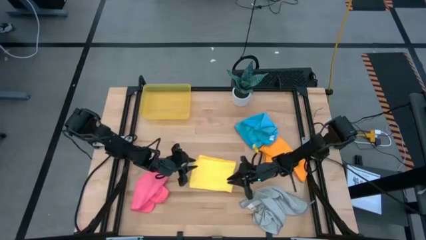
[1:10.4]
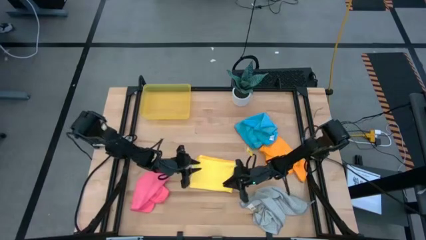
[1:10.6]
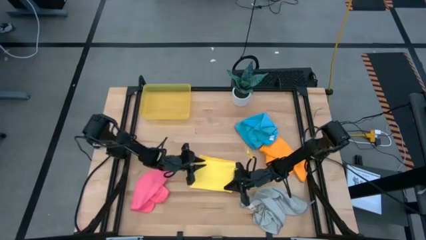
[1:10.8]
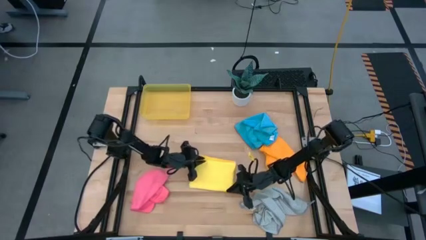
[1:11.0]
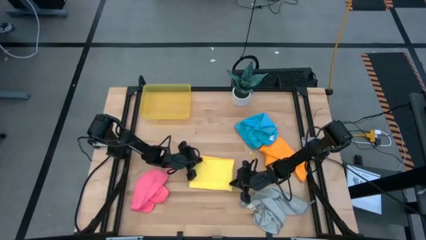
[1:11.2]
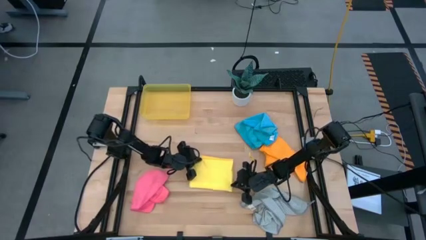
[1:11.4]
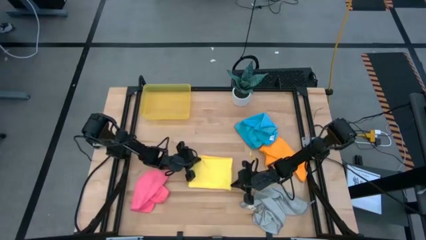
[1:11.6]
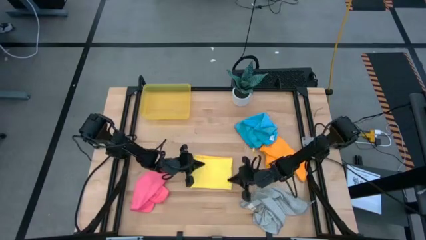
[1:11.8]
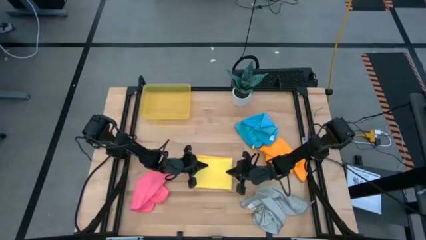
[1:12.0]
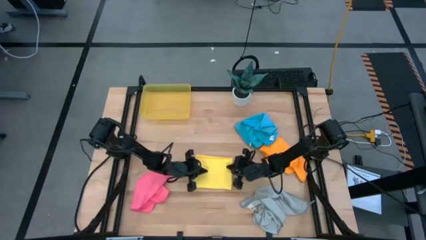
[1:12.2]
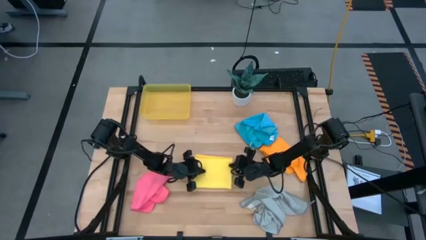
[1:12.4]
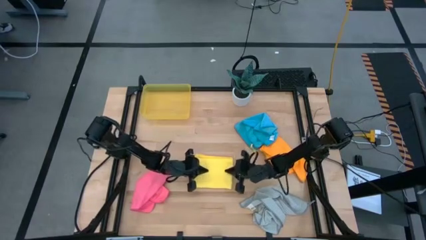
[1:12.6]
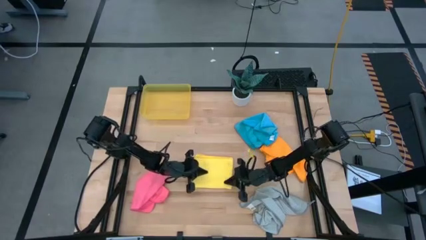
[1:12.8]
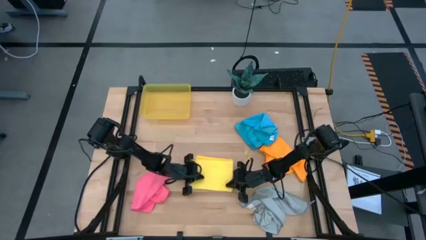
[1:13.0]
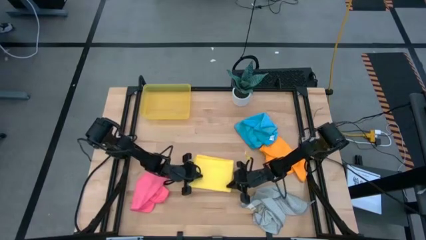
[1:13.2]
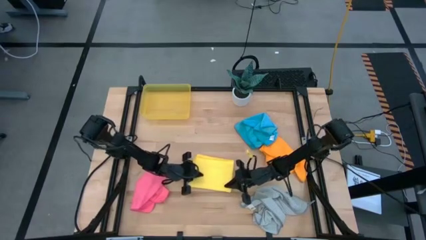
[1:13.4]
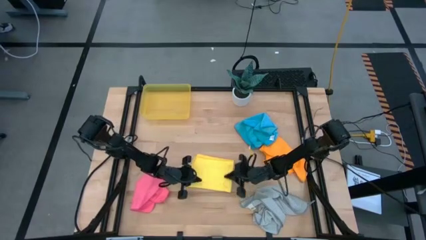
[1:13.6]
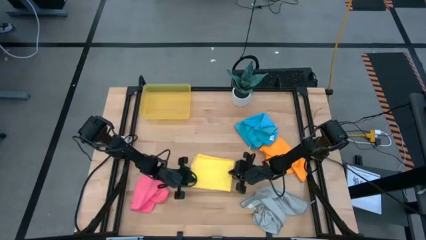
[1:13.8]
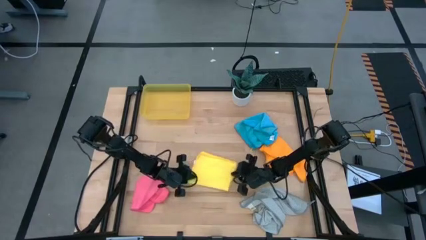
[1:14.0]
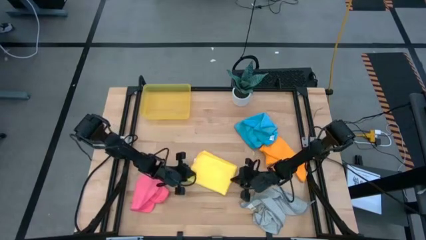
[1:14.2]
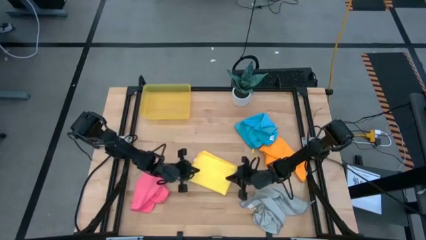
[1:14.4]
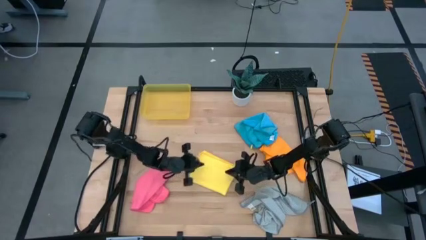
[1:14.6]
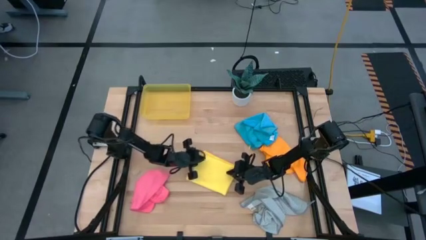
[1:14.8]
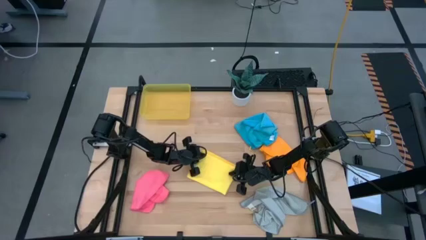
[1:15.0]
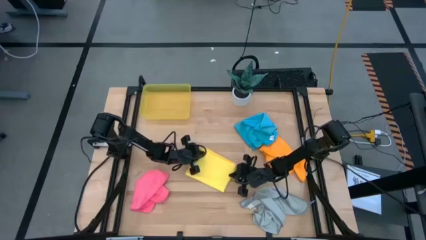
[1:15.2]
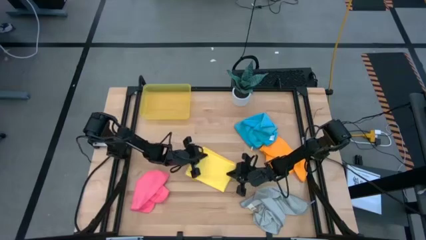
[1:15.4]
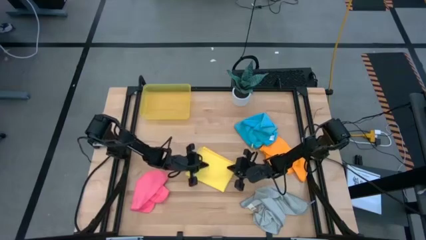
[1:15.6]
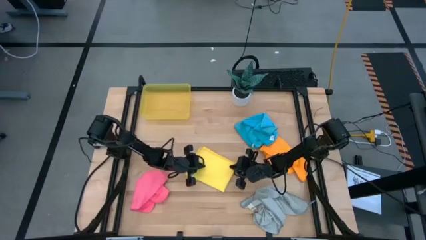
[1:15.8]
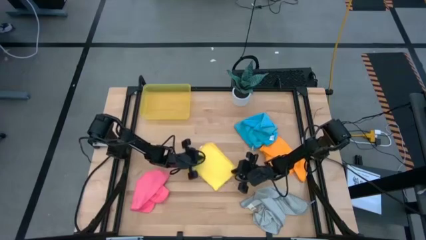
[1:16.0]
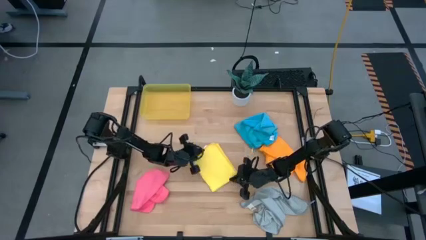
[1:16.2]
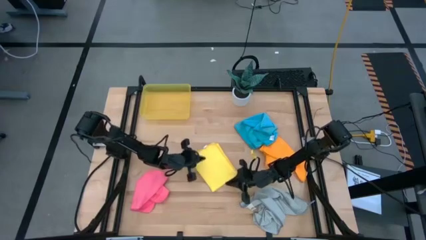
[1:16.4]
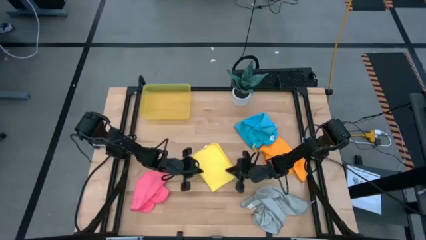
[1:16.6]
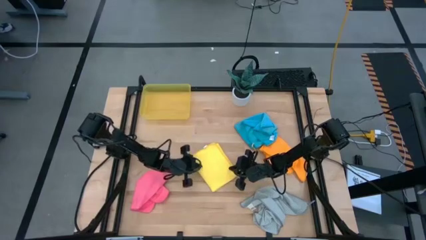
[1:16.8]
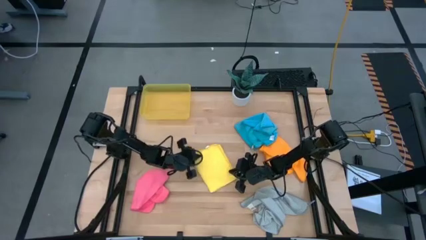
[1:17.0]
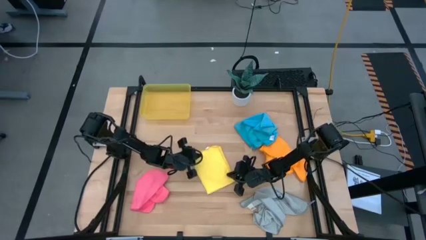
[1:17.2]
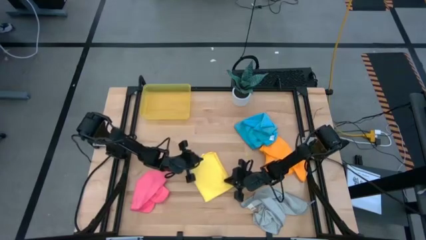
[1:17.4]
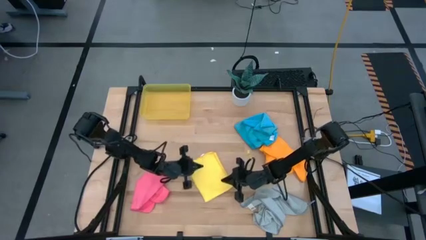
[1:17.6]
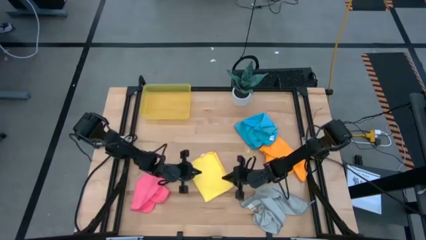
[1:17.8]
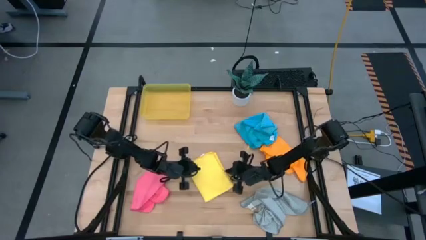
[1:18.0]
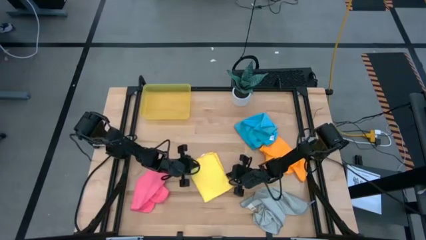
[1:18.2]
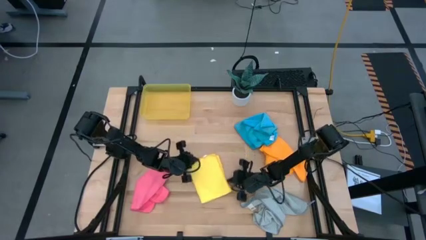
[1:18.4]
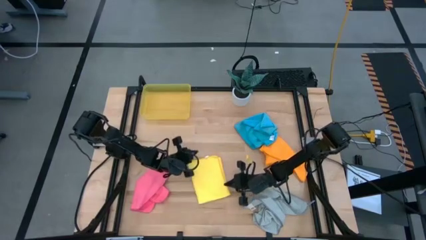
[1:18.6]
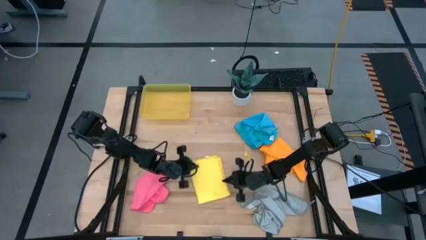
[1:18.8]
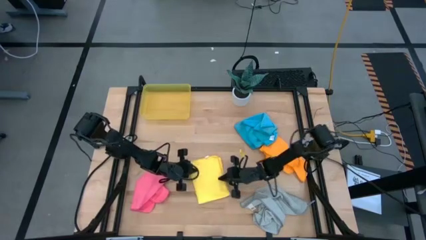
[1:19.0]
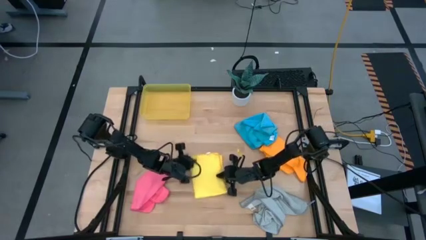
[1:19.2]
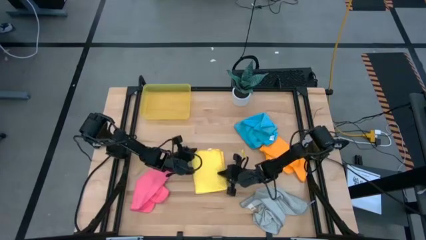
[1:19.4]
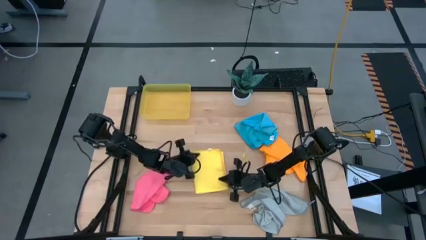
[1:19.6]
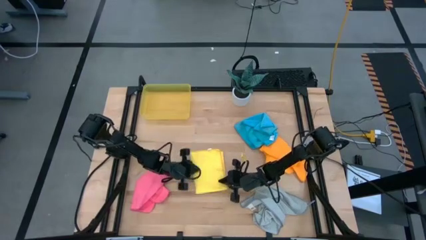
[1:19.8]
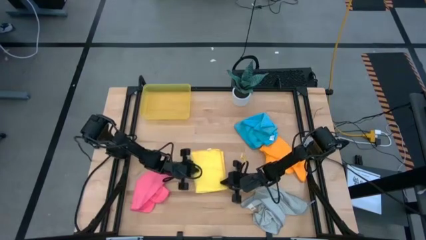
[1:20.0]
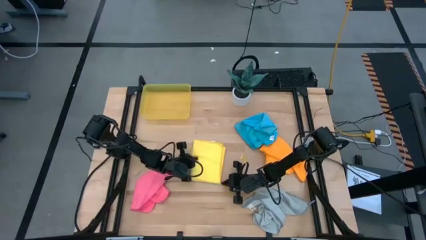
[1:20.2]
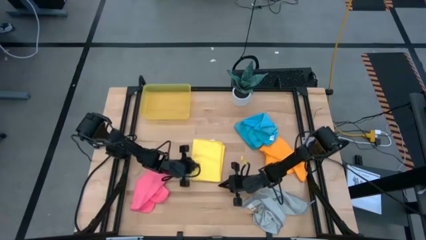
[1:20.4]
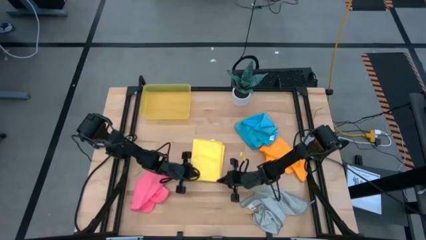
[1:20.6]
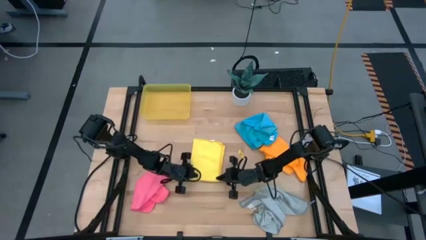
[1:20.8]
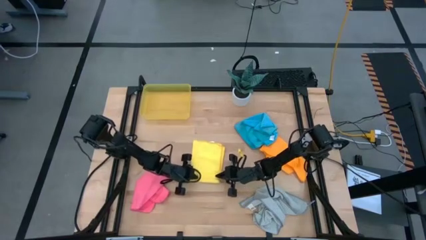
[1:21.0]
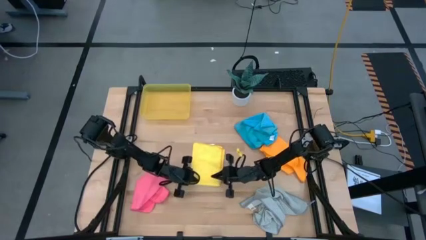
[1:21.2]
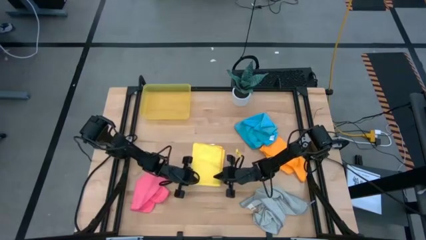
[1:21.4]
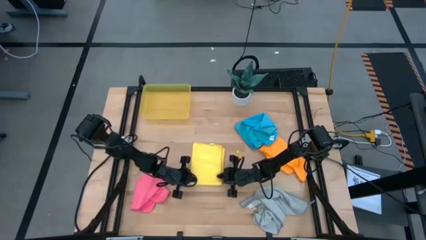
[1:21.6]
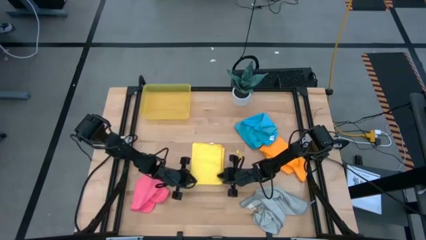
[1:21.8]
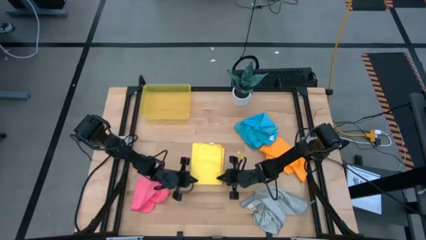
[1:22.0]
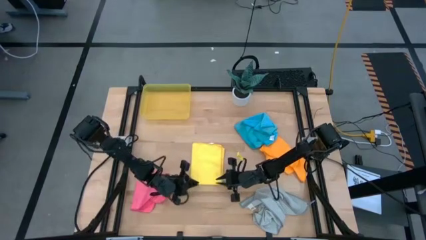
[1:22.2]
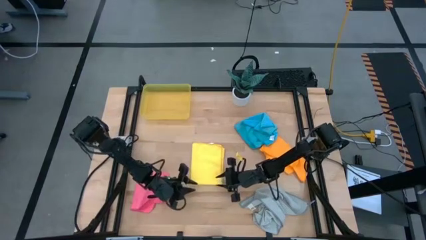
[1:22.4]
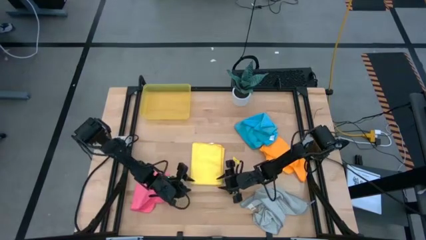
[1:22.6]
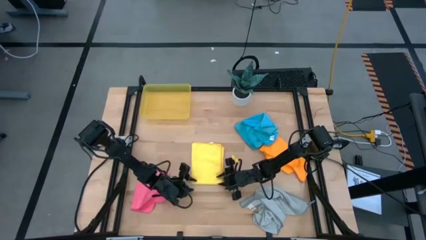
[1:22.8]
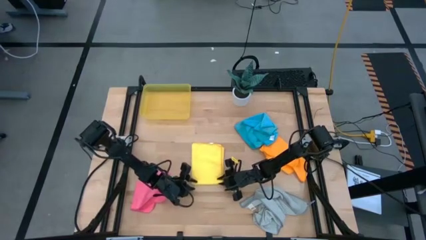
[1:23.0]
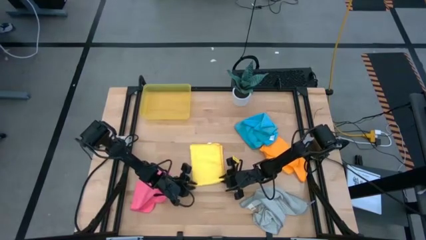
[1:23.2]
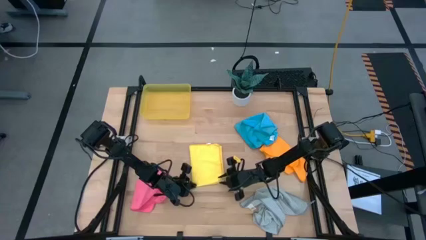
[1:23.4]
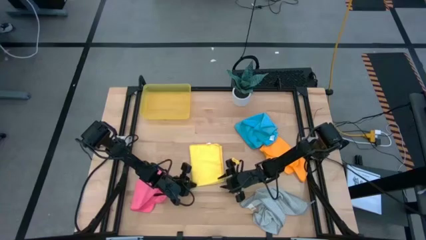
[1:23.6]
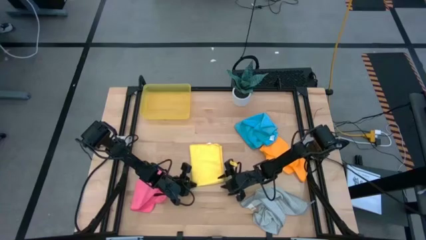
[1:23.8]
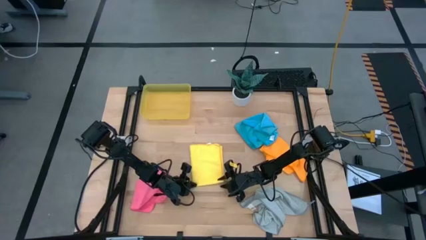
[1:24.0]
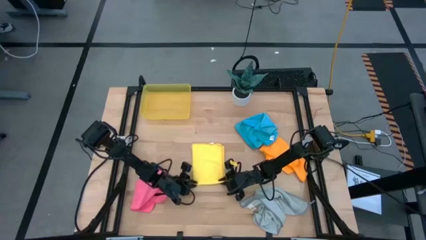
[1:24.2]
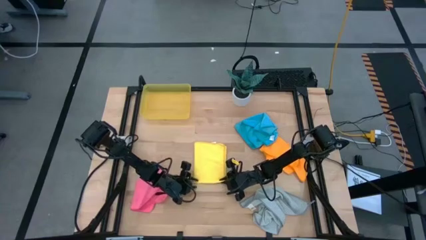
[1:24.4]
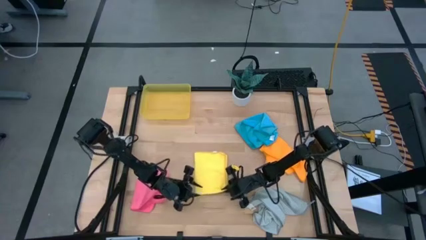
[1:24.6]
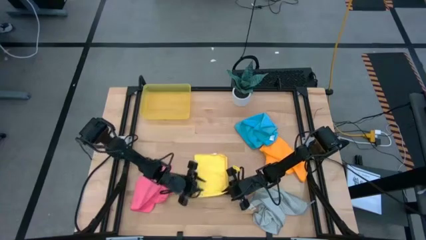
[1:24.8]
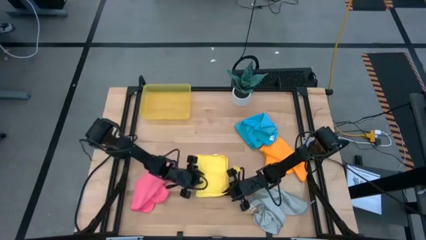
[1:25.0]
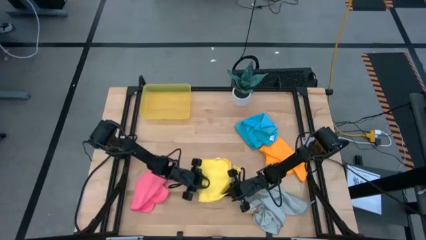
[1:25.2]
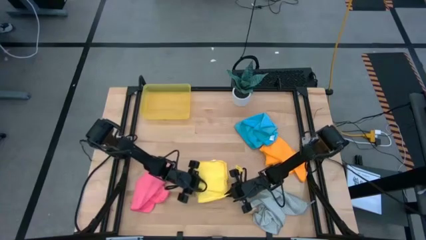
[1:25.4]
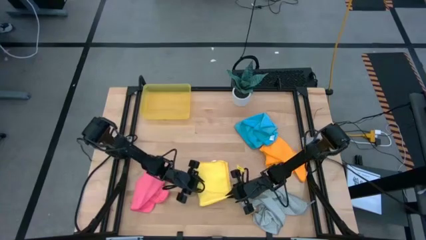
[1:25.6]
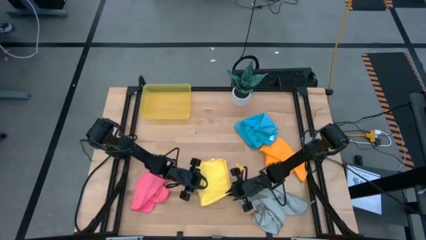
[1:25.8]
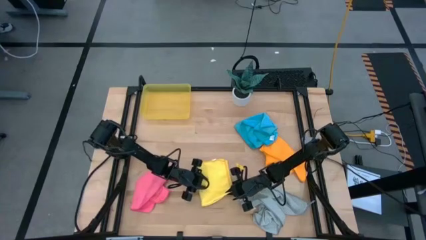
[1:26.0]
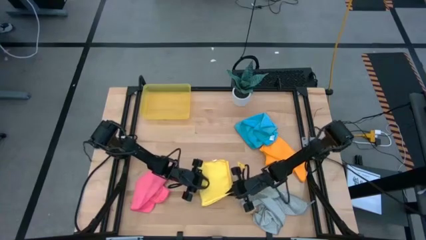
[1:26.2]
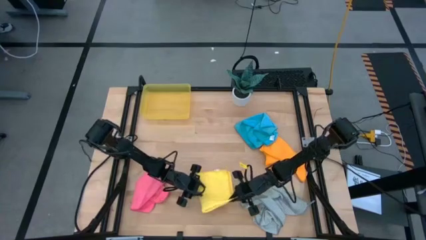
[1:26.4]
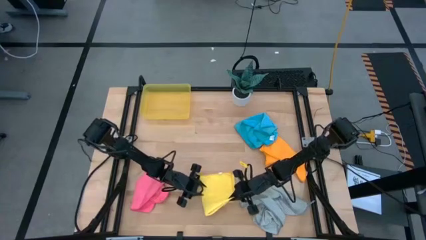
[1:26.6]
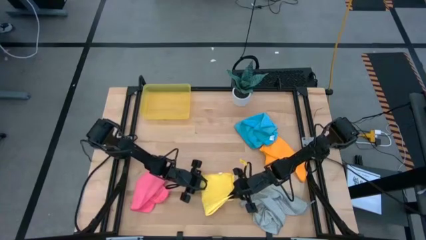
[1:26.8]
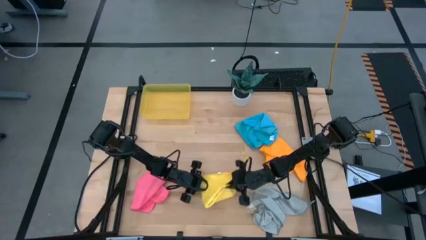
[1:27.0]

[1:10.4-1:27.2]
Task: Fold microfiber towels
Fold the yellow microfiber cloth
